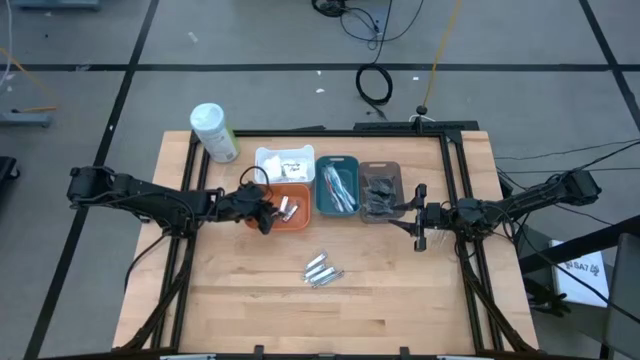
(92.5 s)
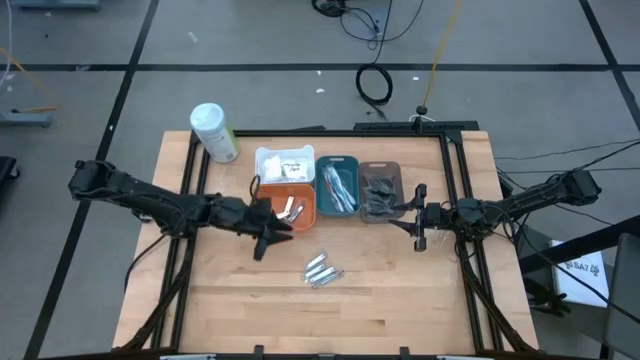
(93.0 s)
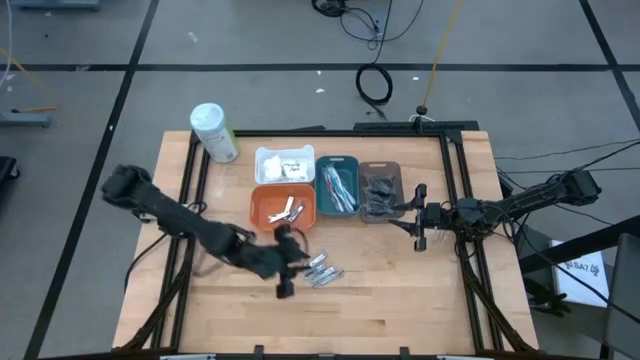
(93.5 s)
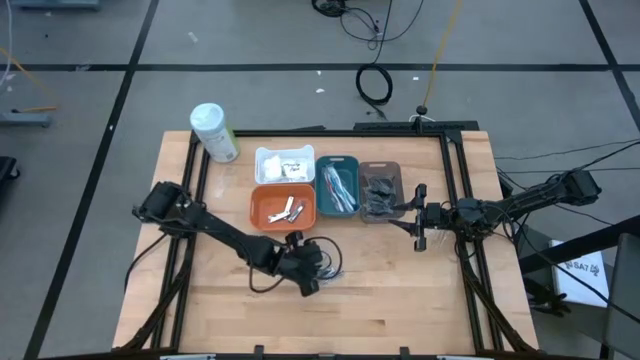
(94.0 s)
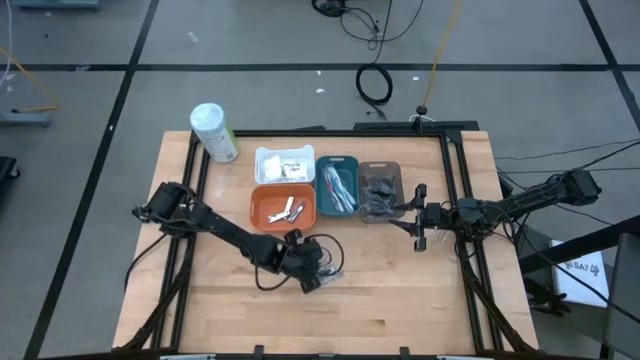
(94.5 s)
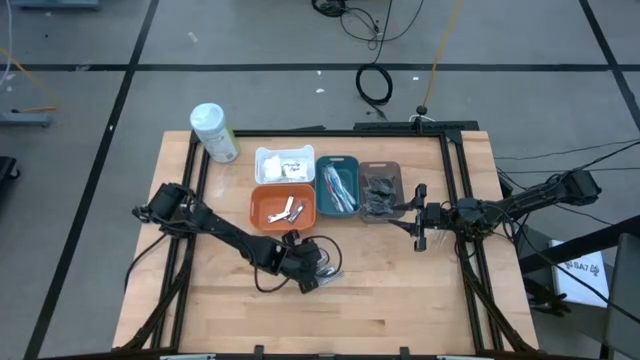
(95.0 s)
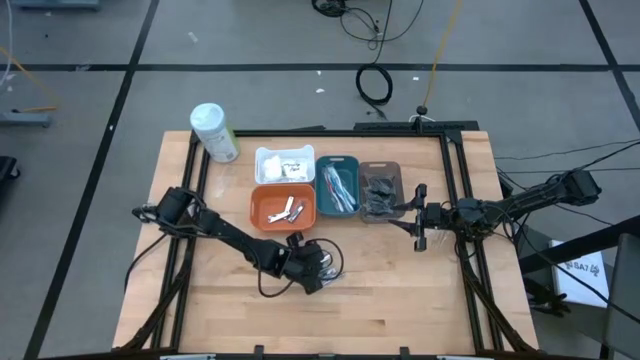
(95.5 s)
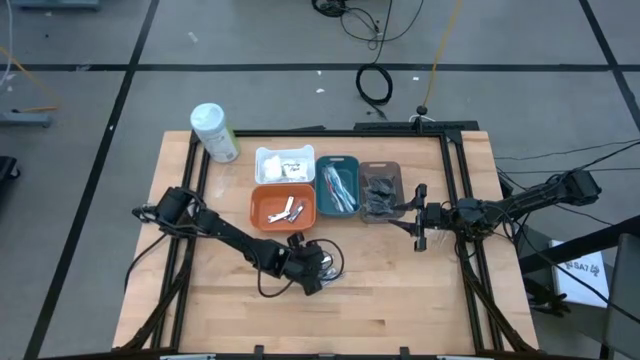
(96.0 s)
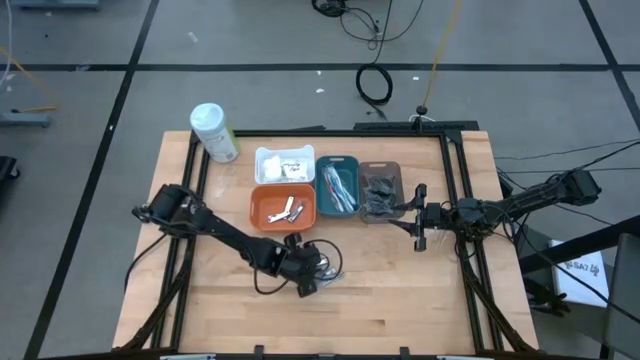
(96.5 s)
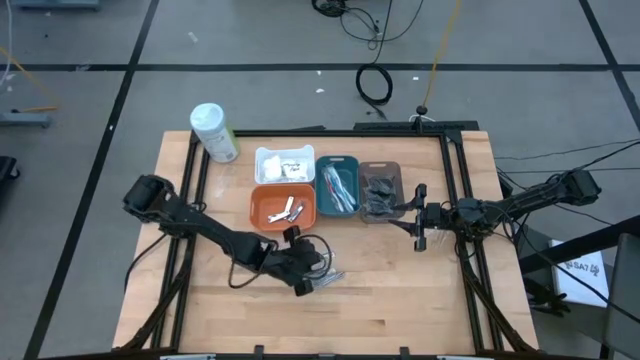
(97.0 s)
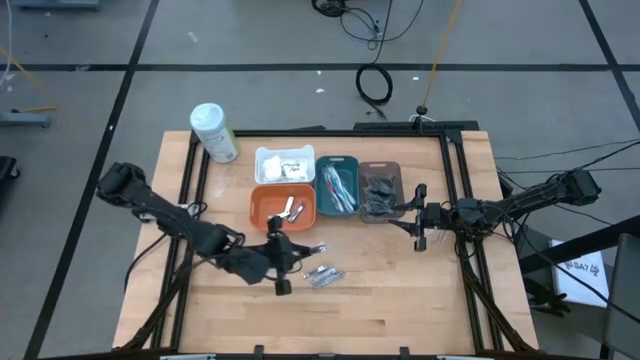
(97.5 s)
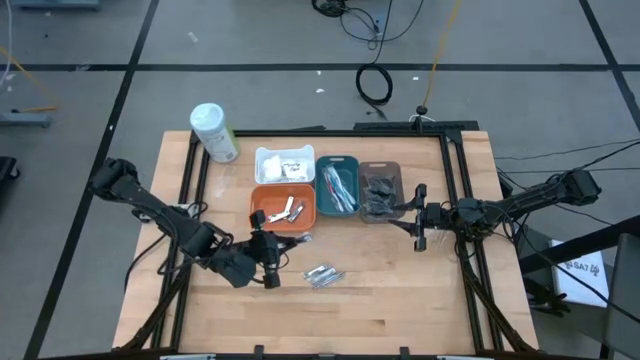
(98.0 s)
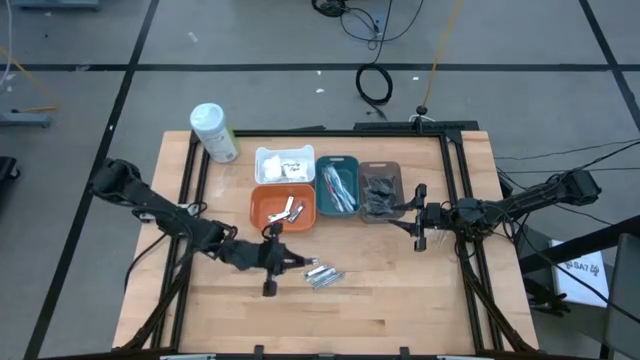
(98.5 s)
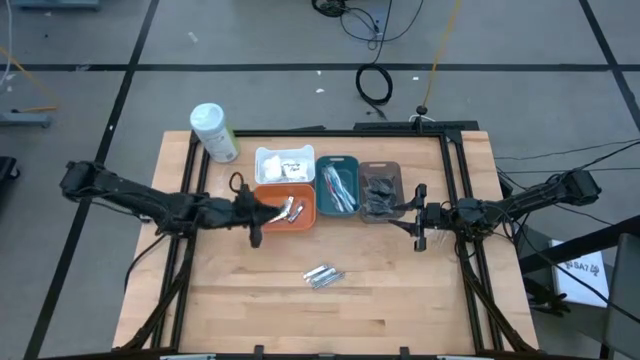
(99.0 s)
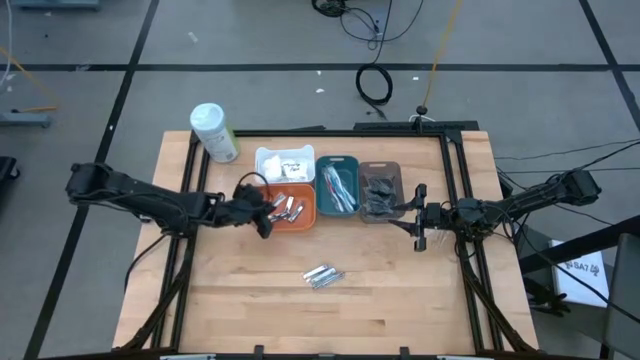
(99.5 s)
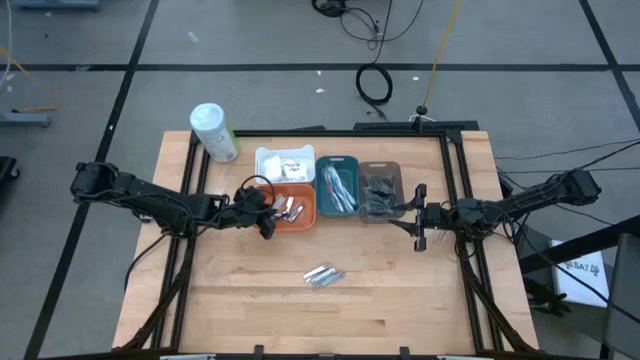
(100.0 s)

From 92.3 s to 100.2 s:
Task: Pick & Place Travel size toiletries
Put the nail cutter into the orange bin

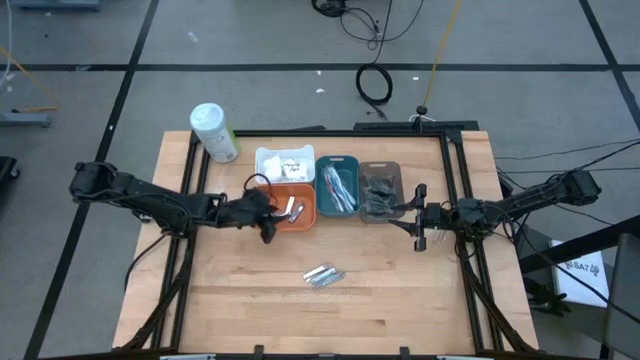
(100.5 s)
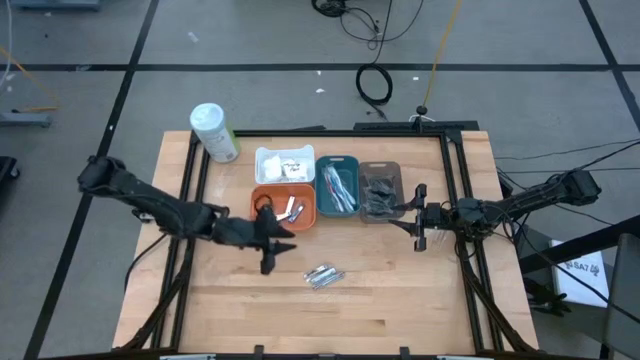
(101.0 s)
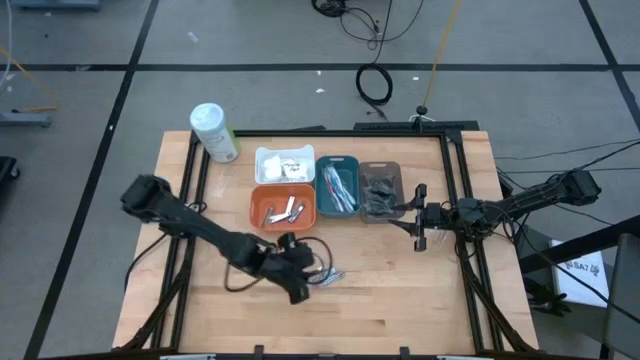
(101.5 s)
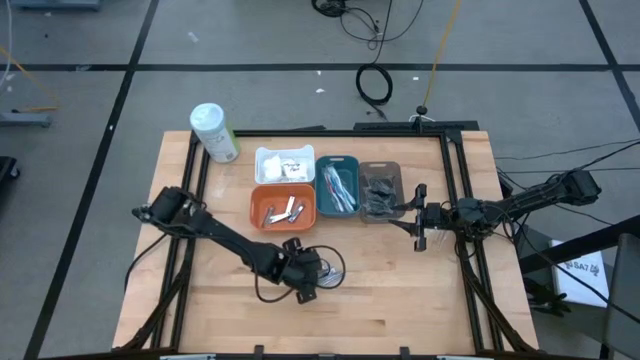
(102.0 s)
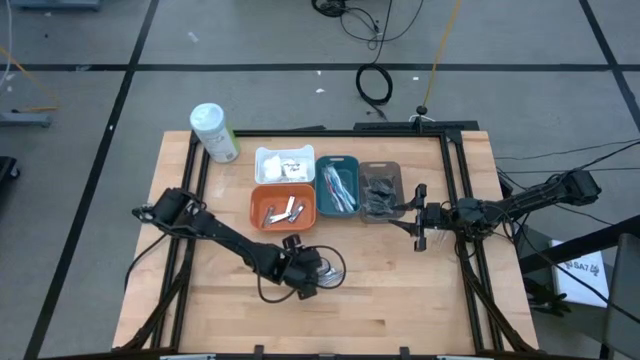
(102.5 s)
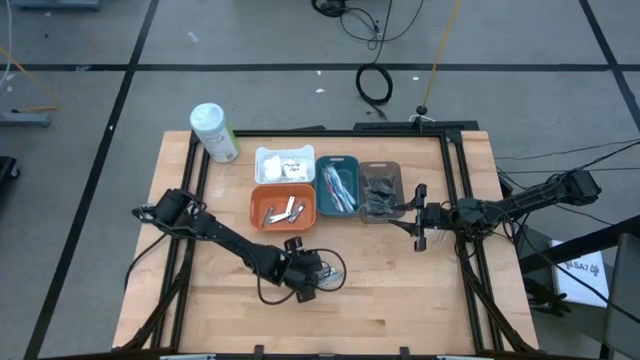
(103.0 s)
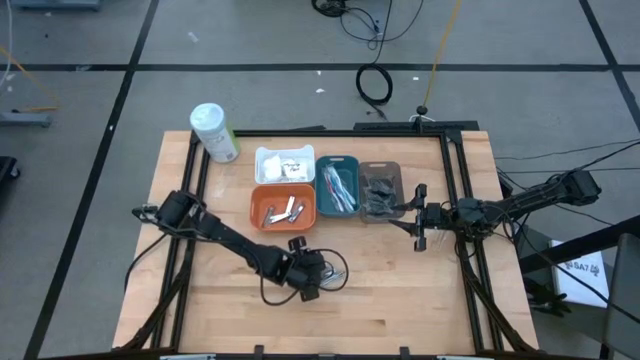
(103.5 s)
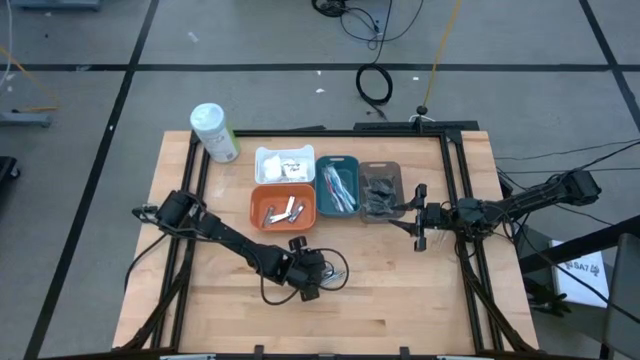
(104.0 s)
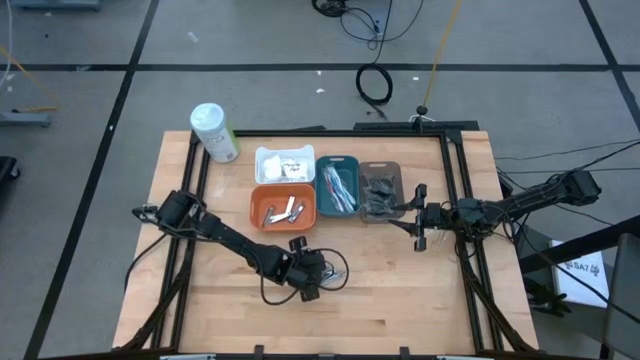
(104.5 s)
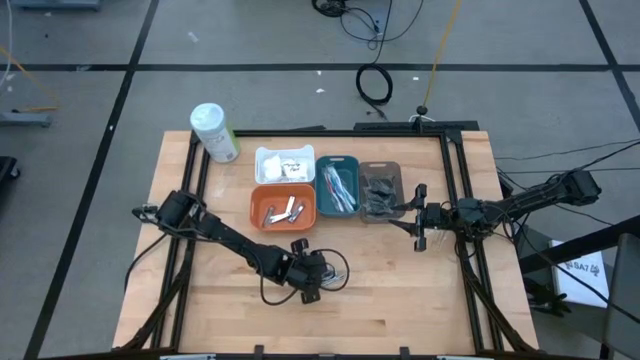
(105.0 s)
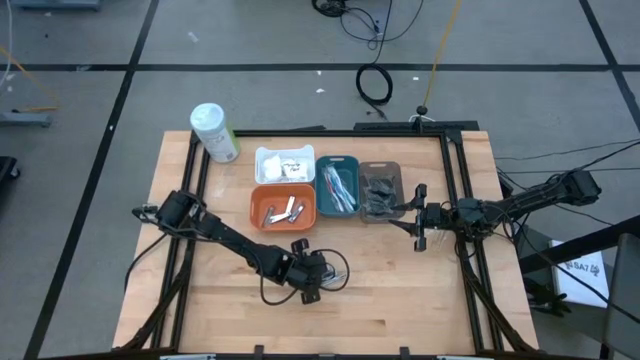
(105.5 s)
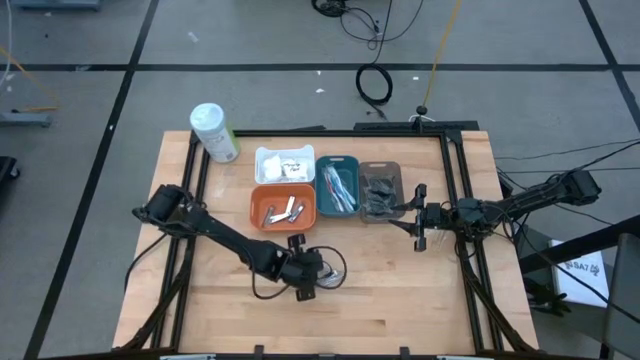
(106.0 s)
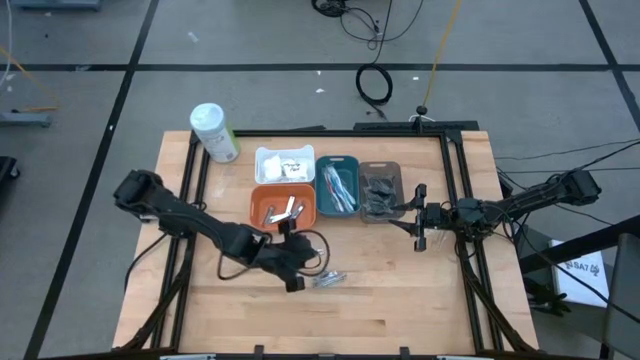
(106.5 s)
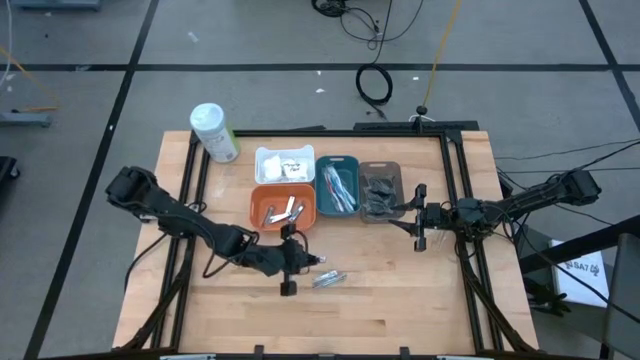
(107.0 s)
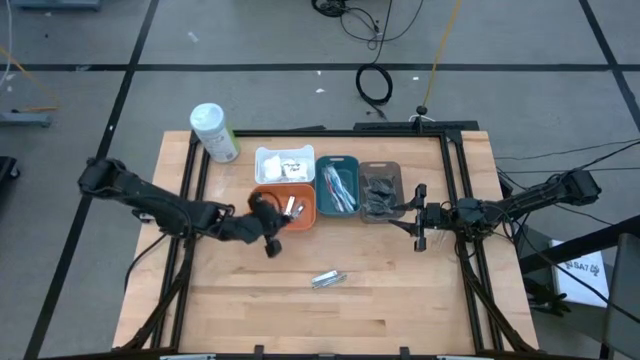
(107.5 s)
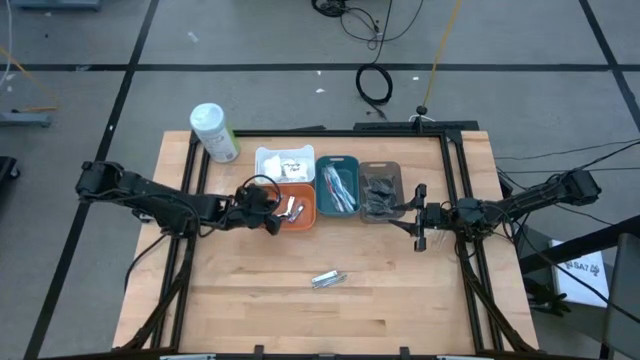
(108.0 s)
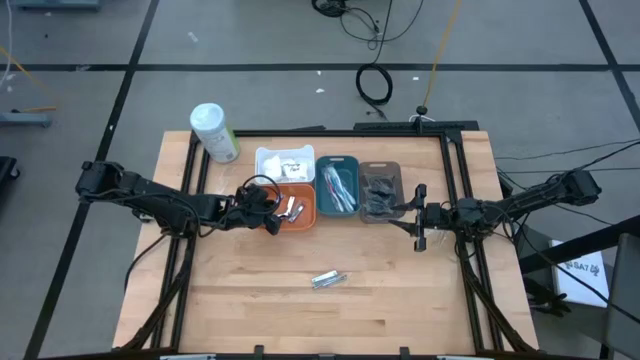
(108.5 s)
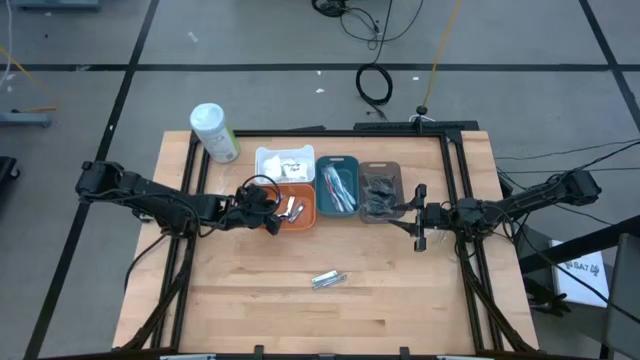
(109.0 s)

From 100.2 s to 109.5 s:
Put the nail cutter into the orange bin

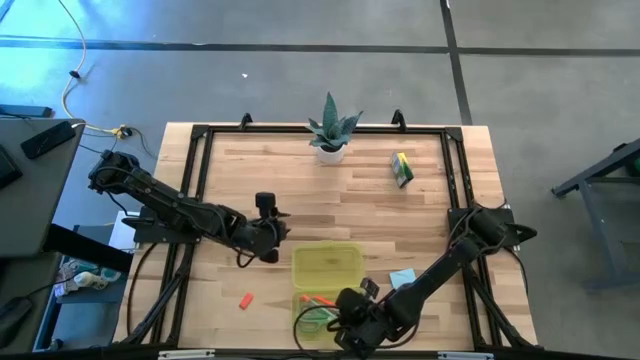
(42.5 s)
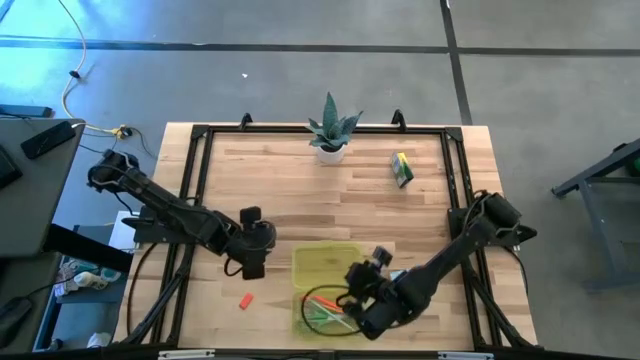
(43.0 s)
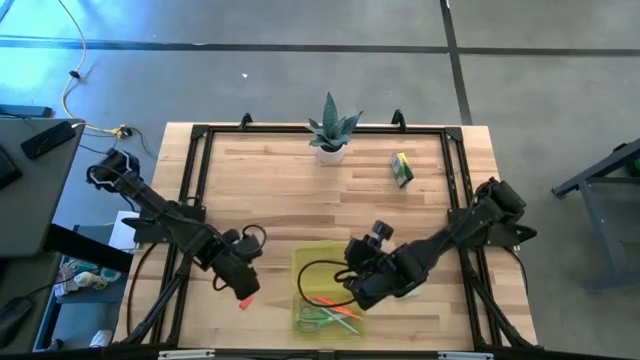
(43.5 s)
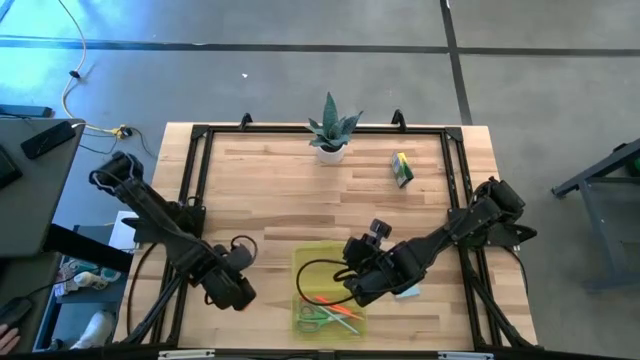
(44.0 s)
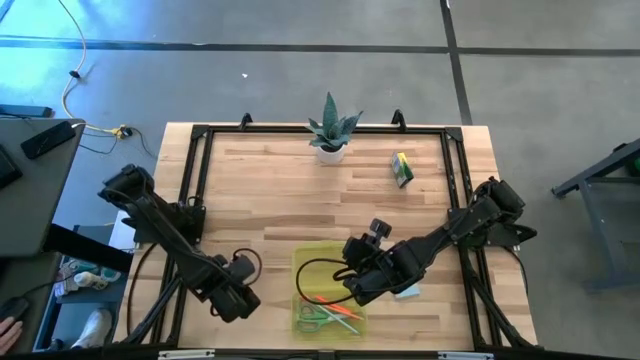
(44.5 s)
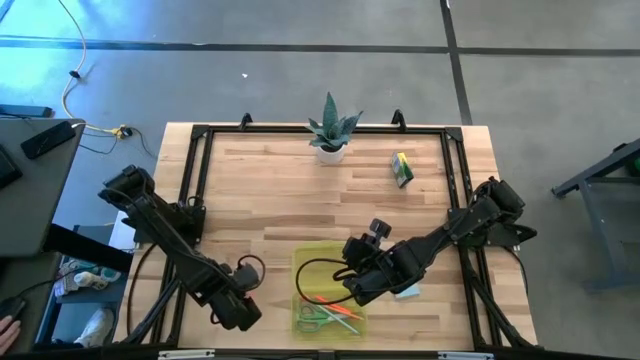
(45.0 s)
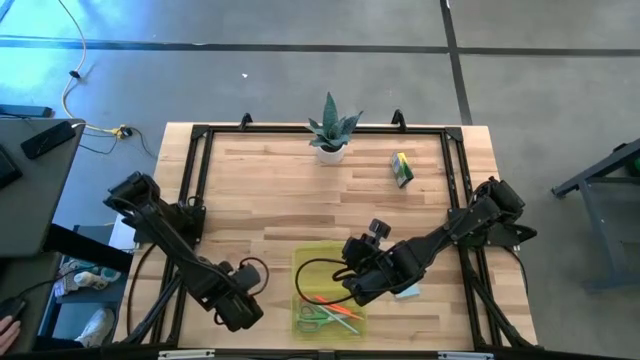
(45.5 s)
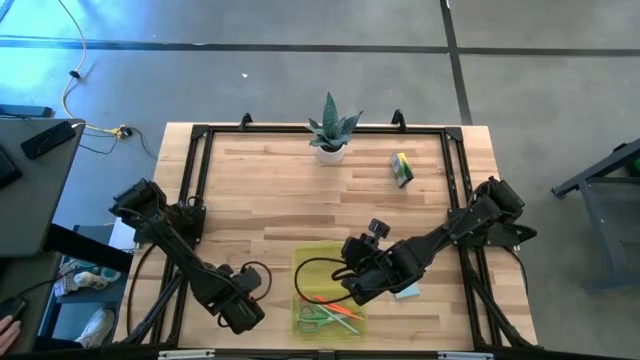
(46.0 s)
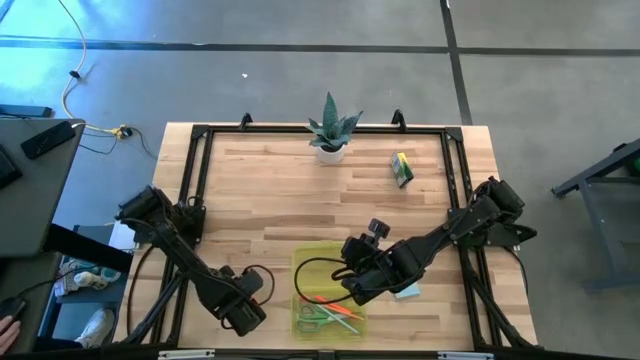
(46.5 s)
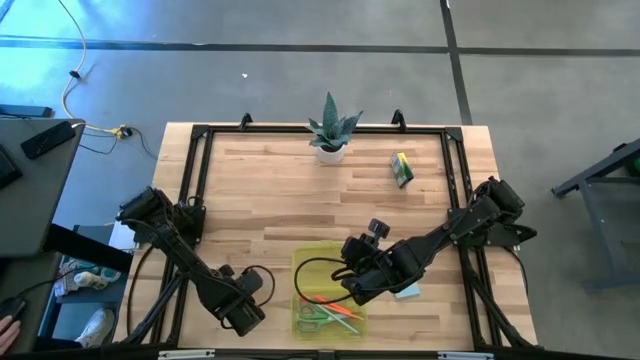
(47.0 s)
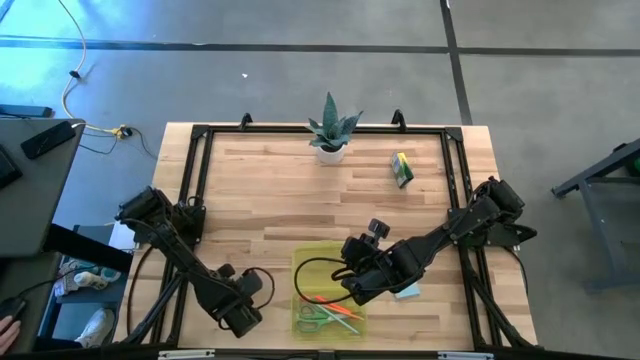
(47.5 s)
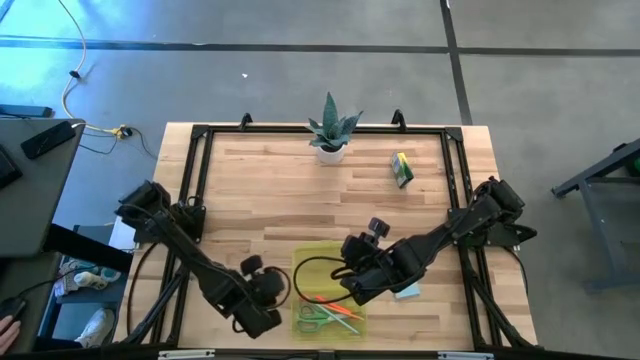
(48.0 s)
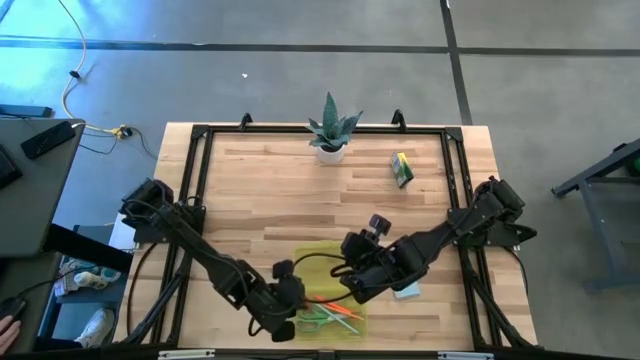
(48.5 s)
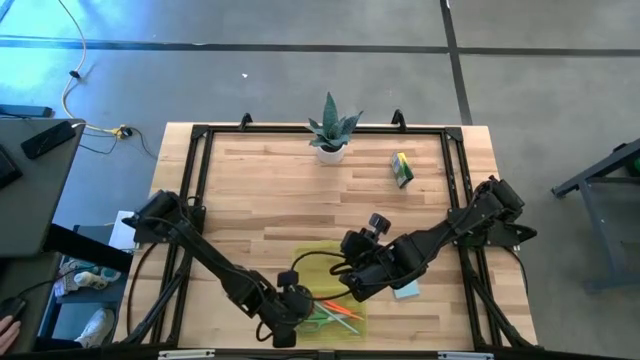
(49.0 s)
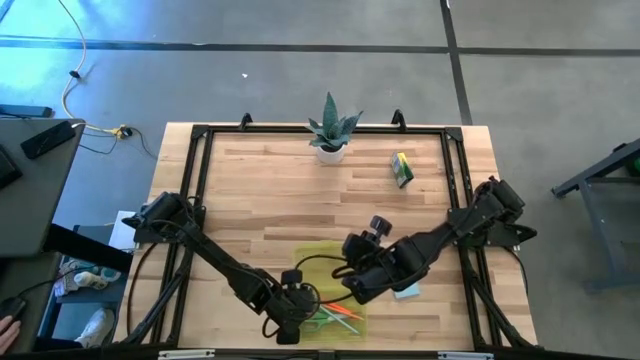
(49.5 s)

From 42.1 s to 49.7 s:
Task: Pack school essentials
Put the orange eraser into the yellow supply box
